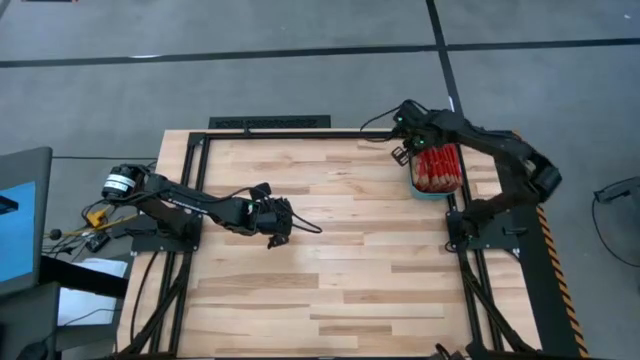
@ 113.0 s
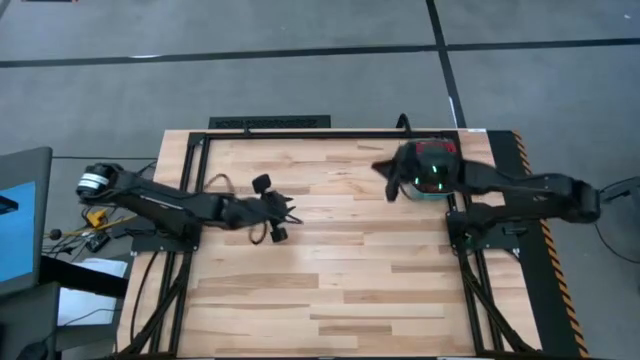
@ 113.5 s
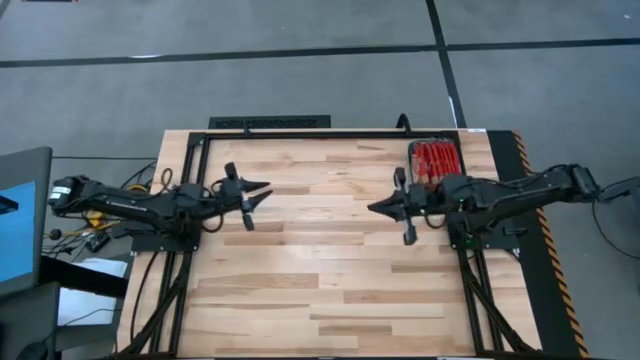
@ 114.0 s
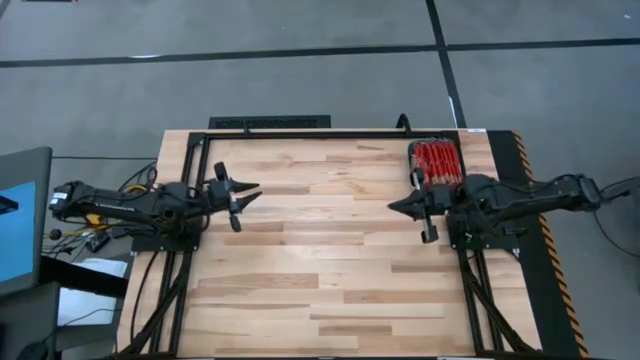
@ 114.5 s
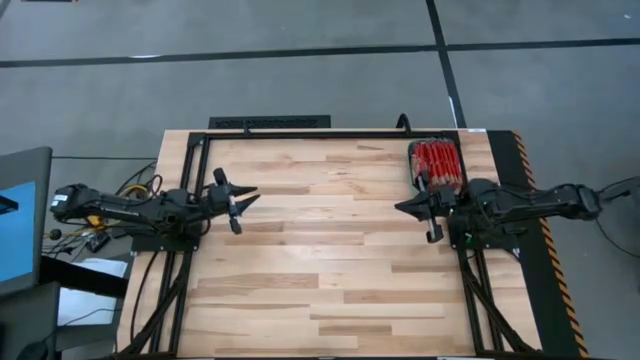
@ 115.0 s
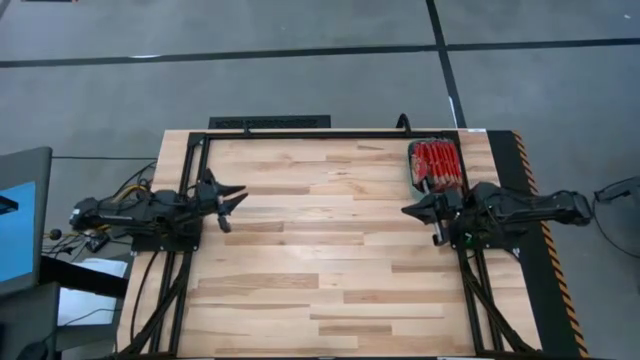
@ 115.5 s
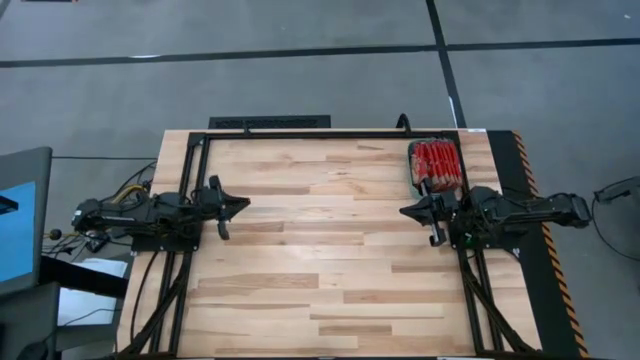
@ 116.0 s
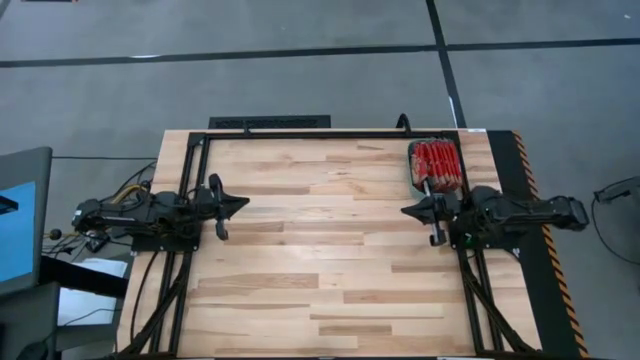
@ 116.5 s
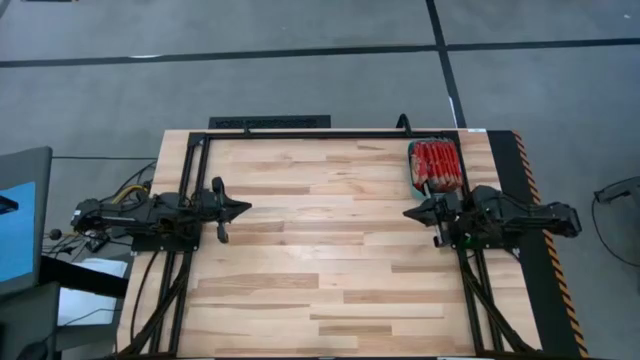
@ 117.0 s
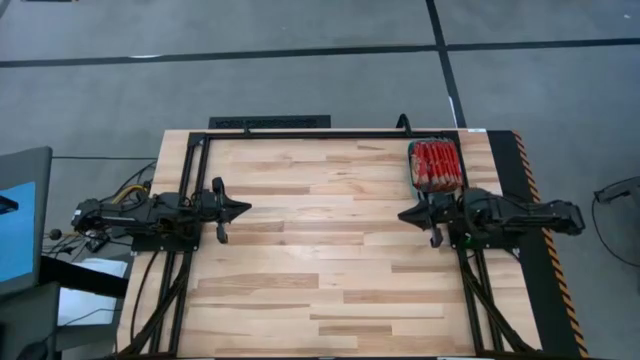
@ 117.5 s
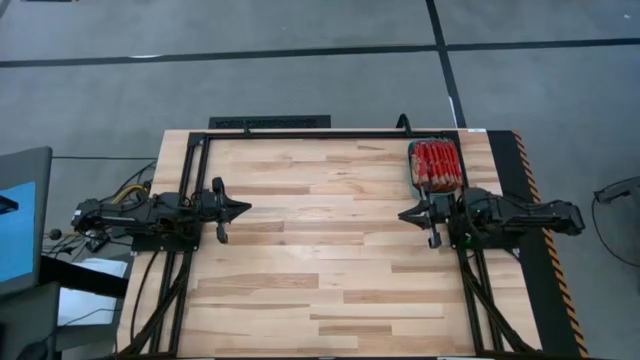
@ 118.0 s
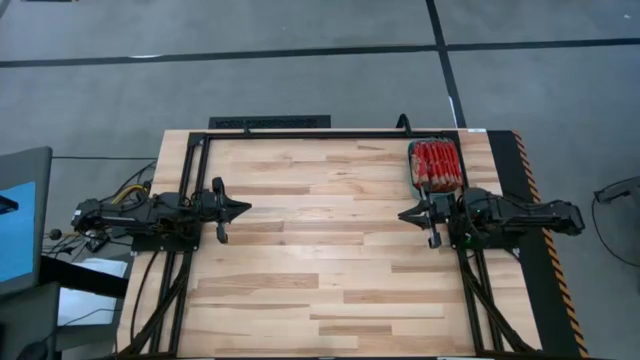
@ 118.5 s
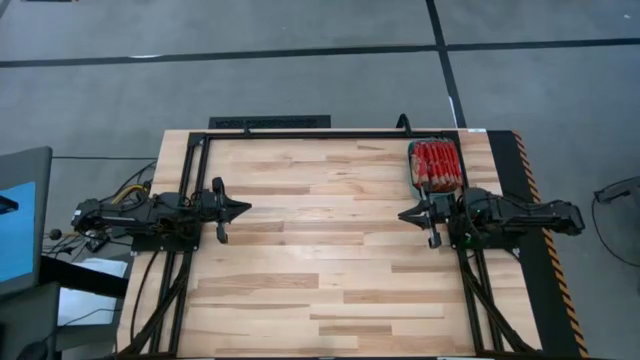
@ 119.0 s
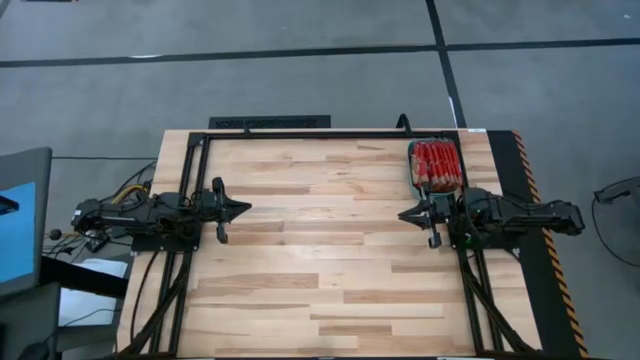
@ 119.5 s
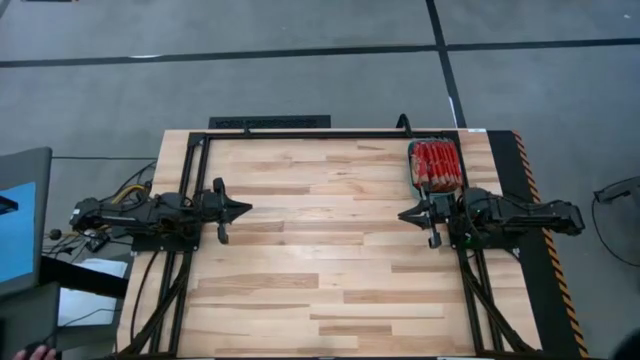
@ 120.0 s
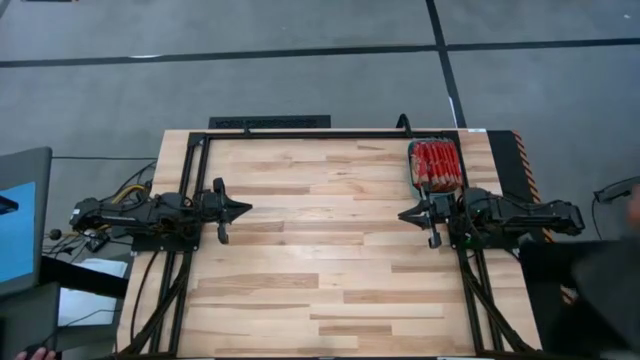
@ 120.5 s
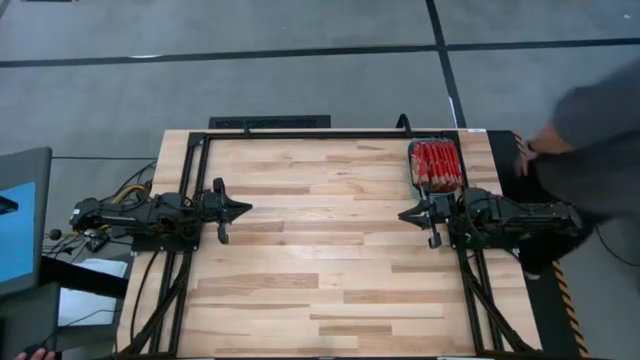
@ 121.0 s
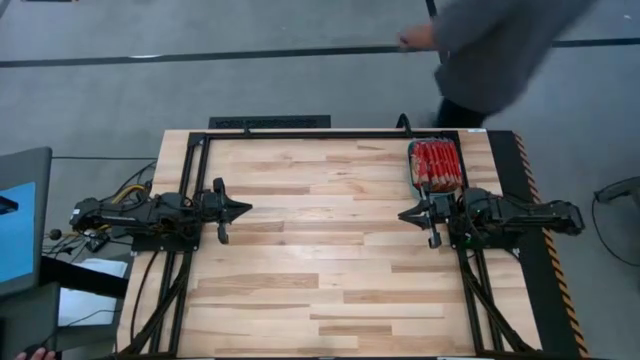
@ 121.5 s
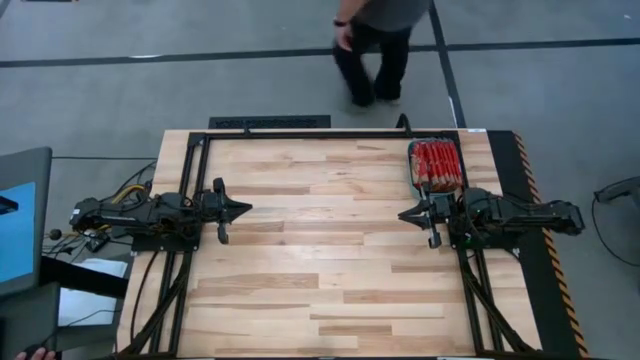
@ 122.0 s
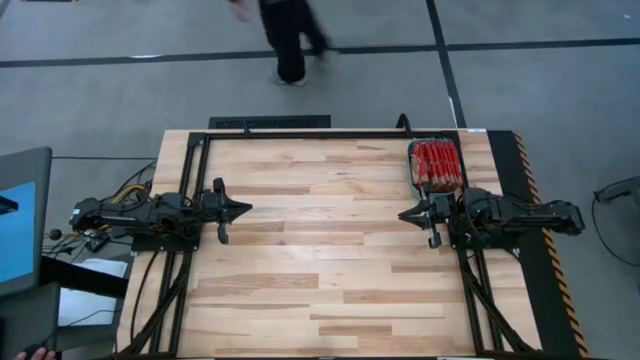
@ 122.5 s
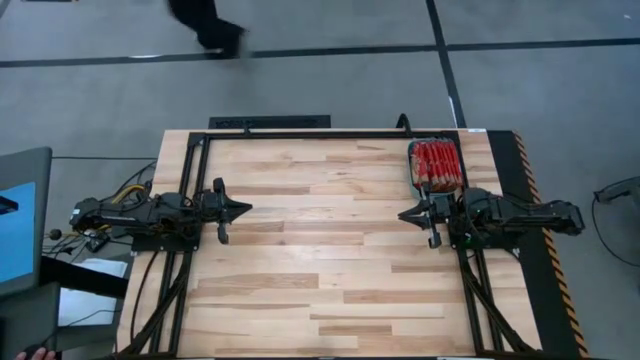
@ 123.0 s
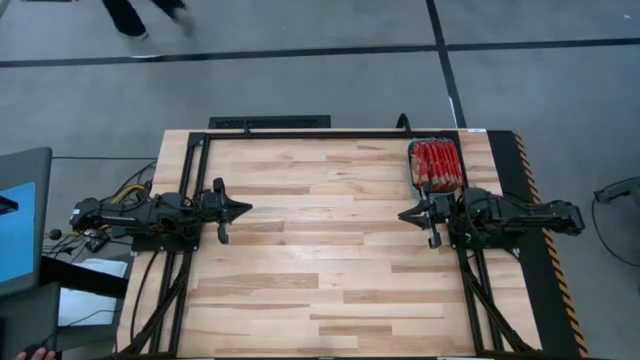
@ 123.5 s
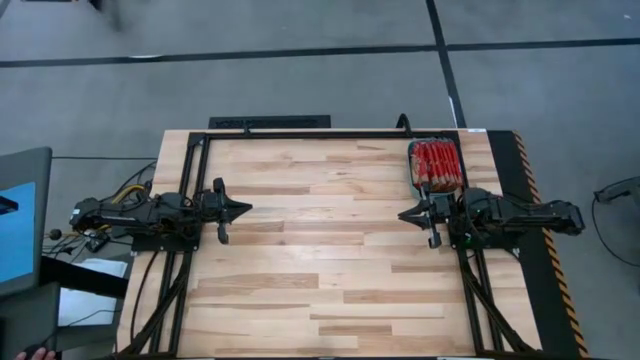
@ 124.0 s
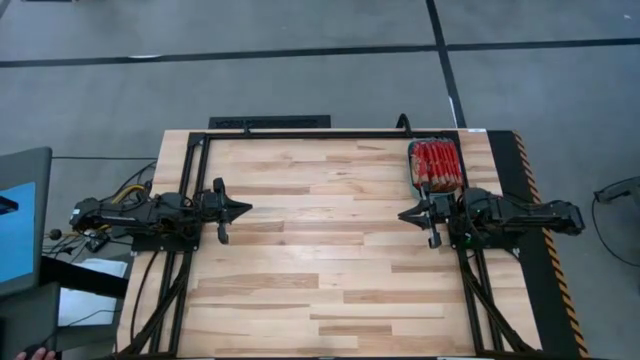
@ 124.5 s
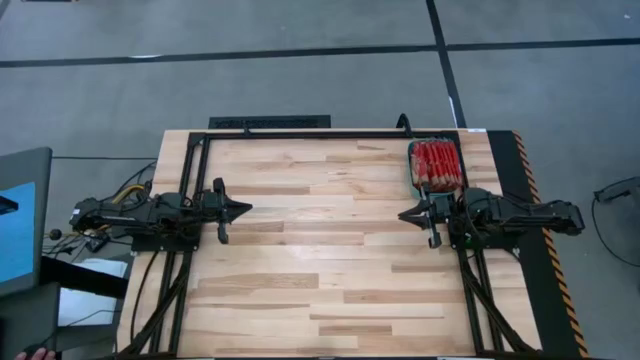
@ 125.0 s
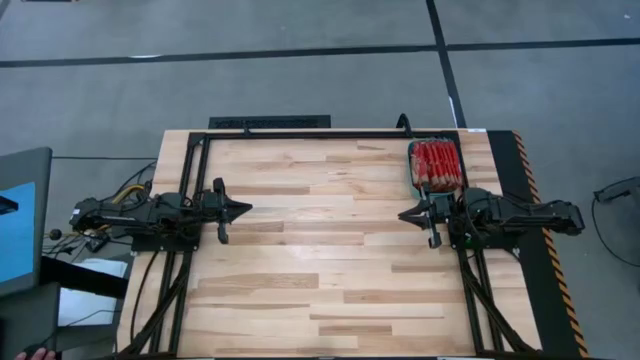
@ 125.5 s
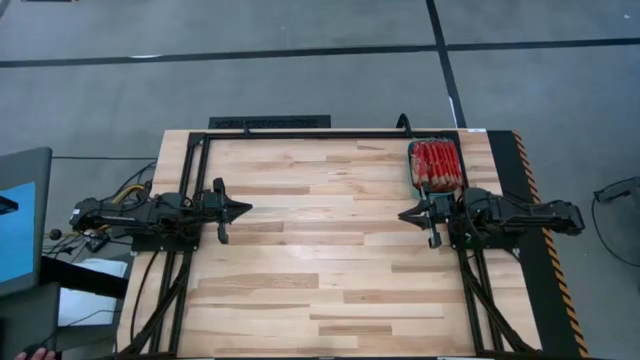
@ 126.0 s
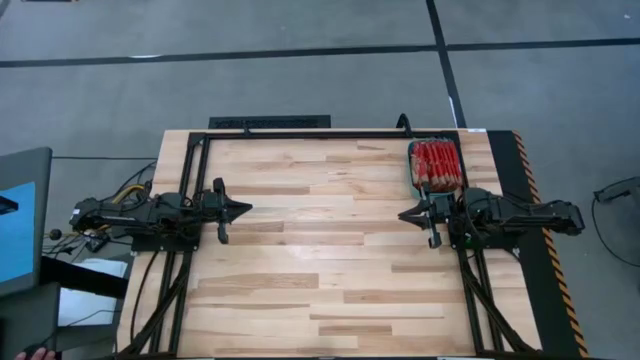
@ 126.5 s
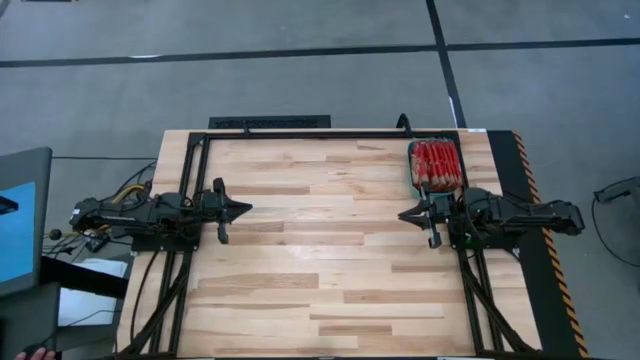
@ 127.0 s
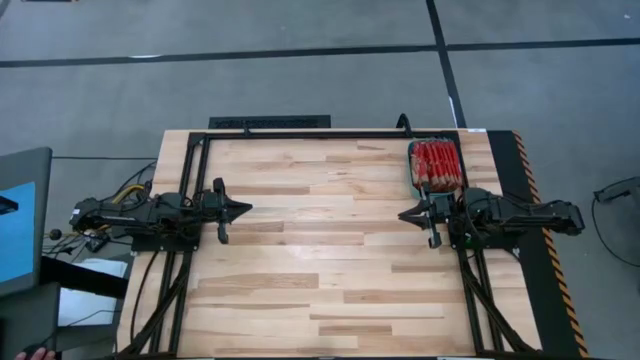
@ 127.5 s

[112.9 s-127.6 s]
Task: Sort popcorn bags into baskets
Return to Home Position

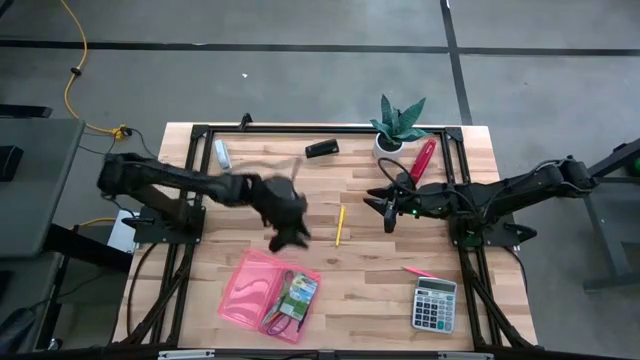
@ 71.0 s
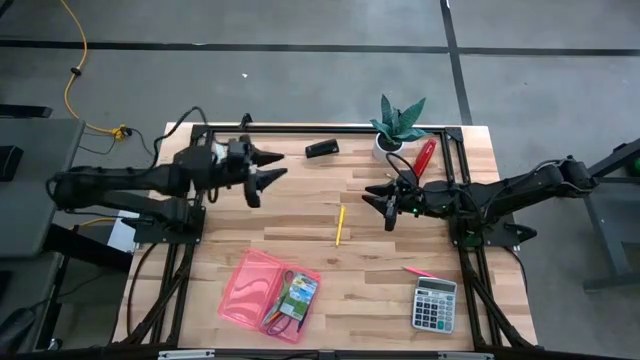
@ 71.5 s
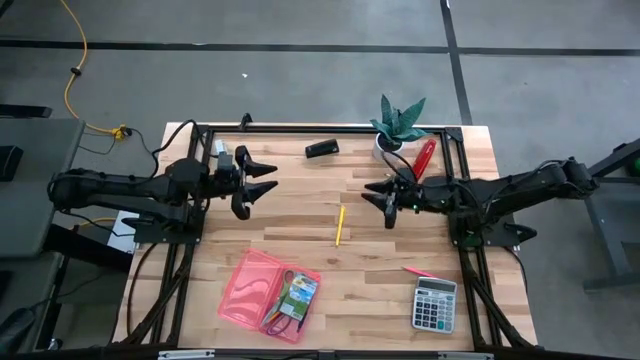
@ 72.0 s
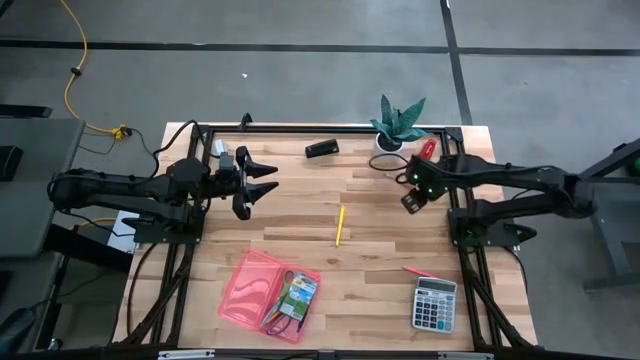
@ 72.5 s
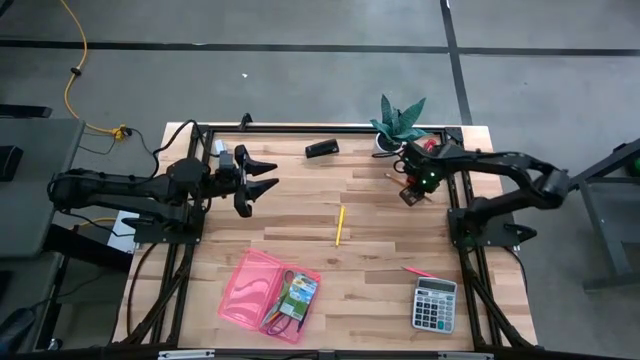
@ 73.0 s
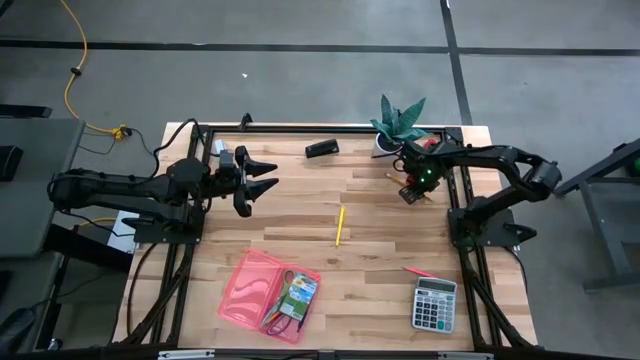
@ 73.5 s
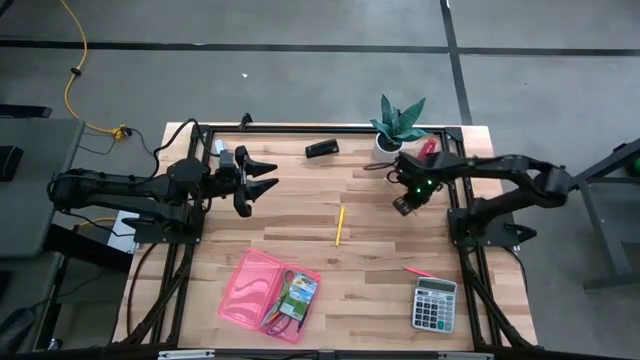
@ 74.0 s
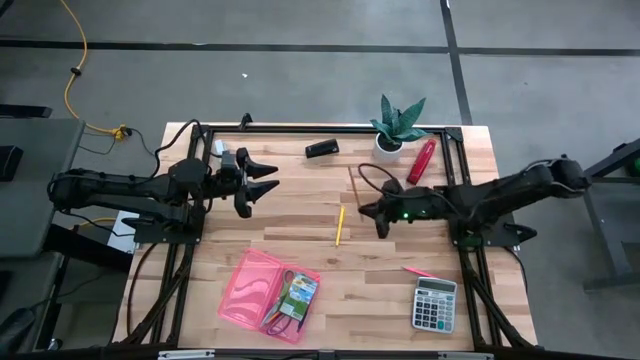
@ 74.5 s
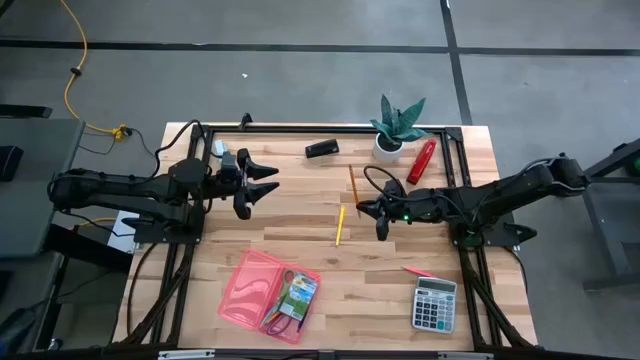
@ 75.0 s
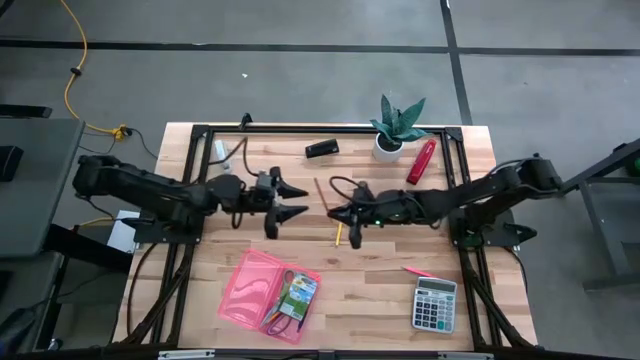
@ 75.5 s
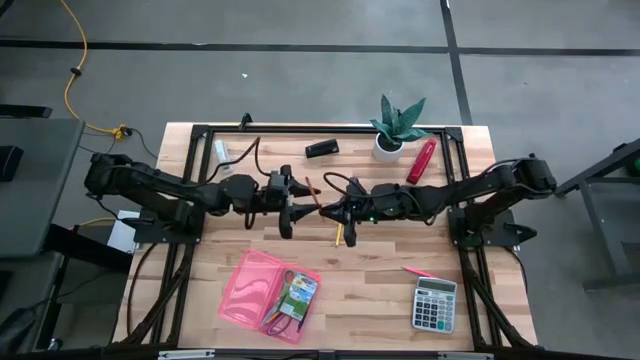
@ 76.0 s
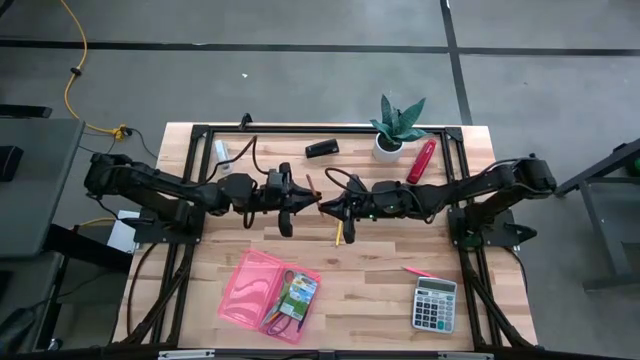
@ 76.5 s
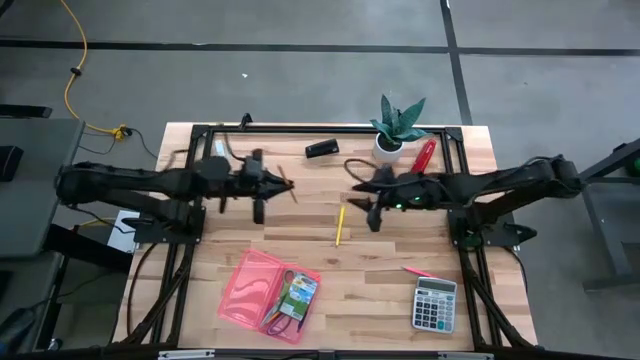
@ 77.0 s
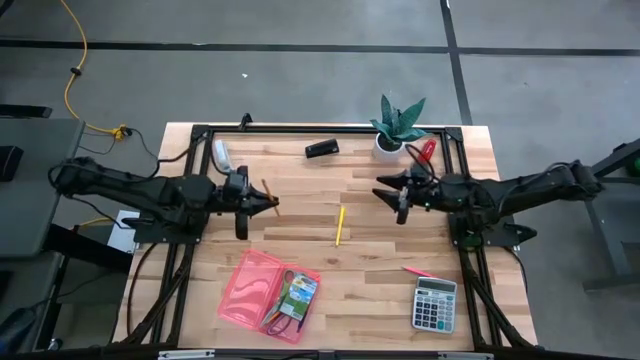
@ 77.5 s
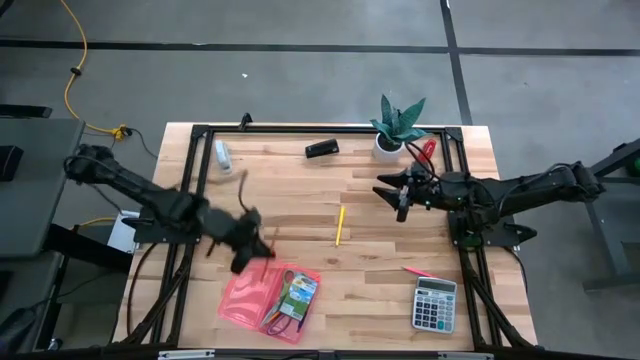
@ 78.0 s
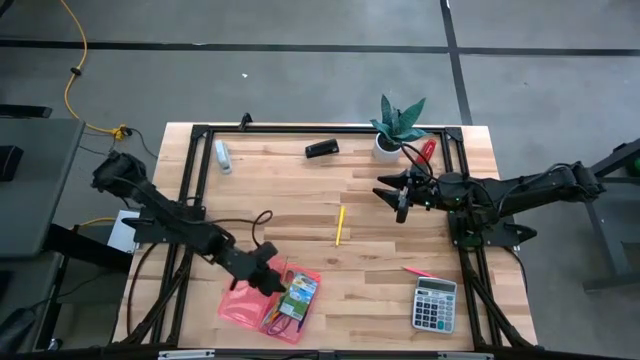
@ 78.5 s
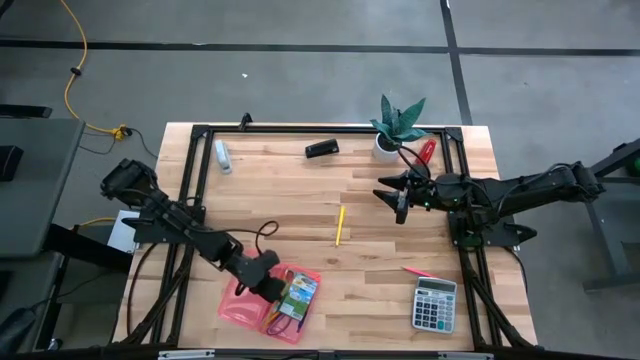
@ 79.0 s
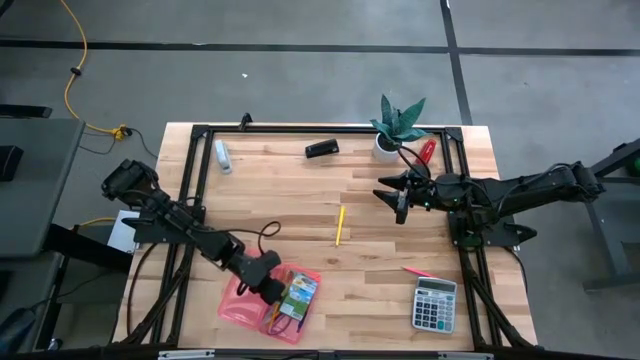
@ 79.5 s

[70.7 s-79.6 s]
Task: Pack school essentials
Put the orange pencil into the supply box
